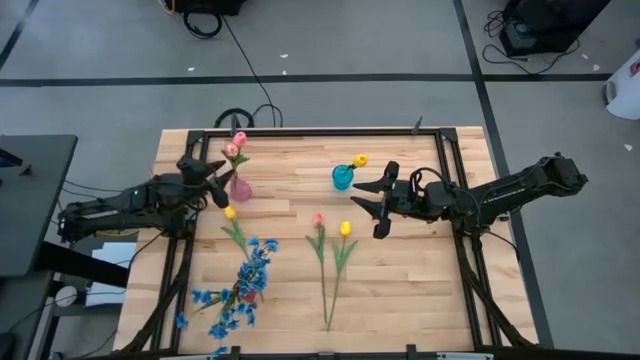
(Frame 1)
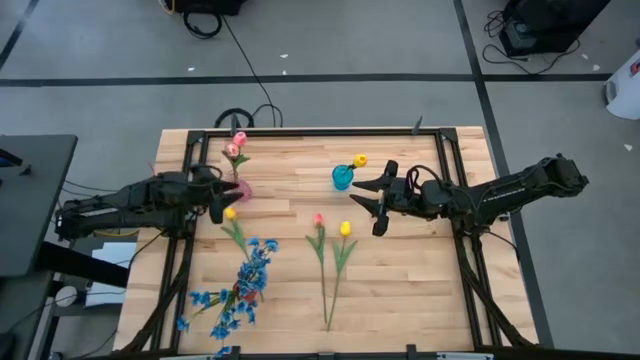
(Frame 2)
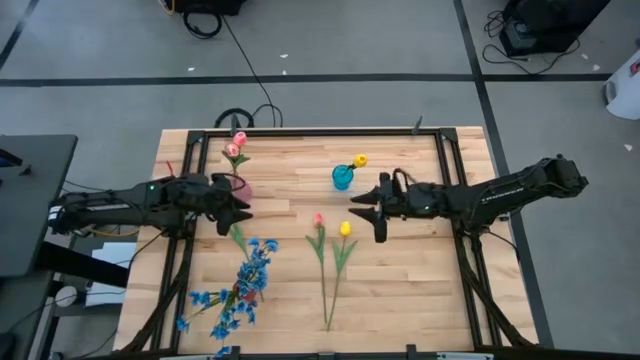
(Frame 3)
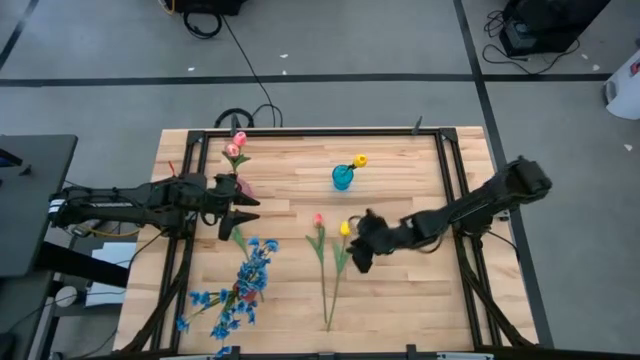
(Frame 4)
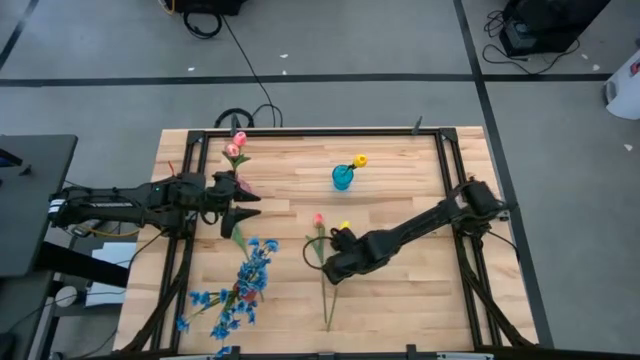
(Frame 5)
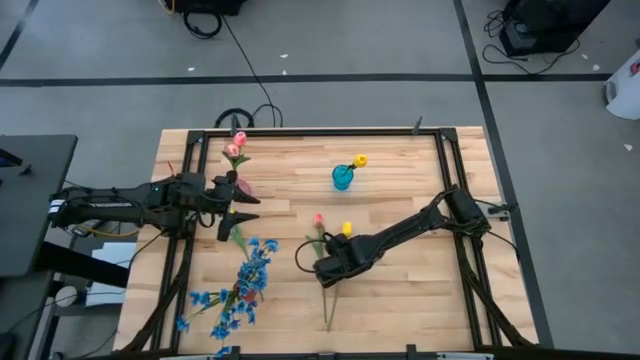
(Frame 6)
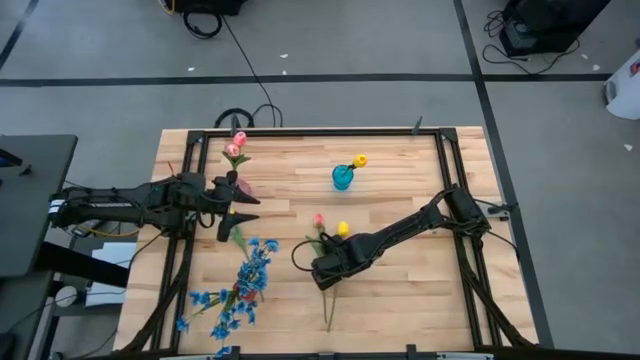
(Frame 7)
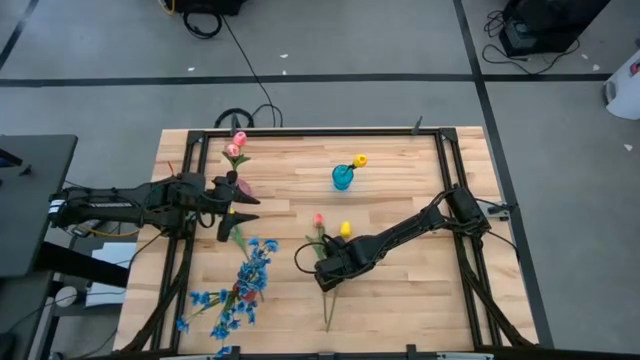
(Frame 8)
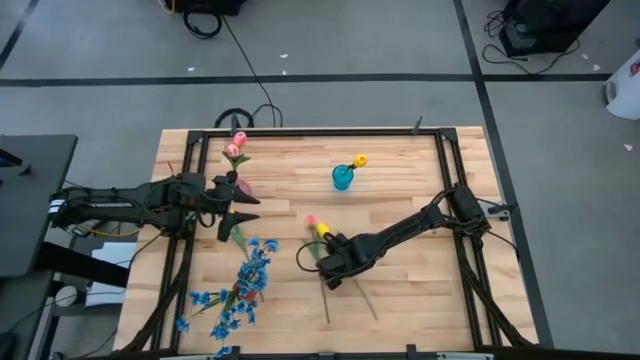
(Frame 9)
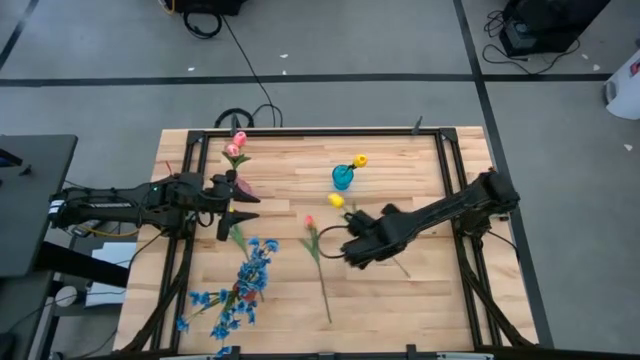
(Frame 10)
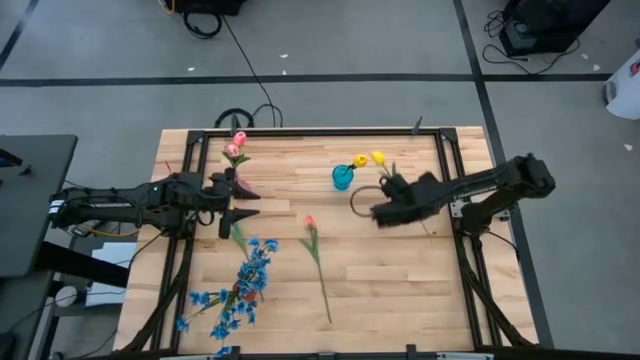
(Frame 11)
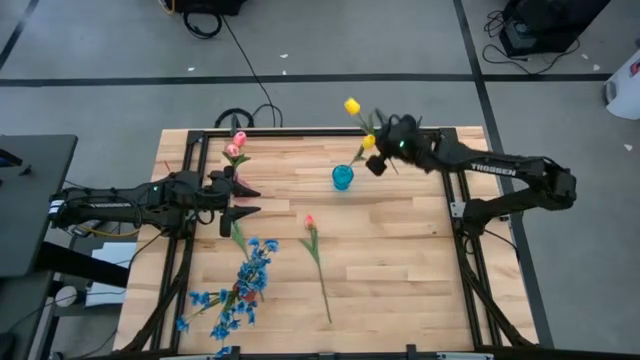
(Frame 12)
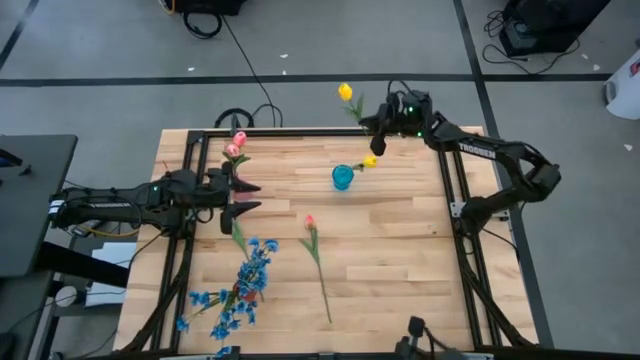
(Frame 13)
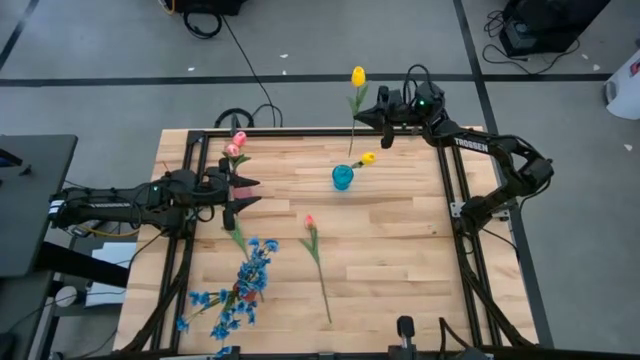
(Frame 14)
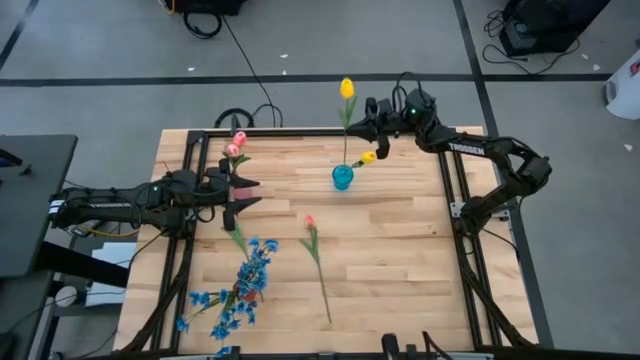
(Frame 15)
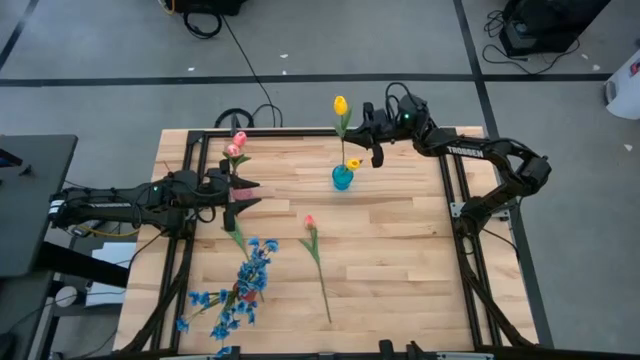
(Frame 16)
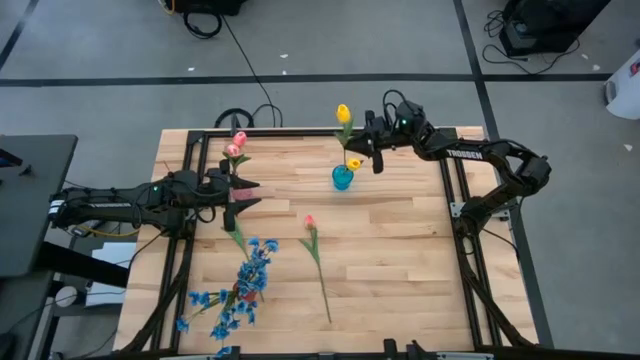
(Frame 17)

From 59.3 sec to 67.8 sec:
Task: Sort flowers into vase by color
Put the right yellow tulip into the blue vase

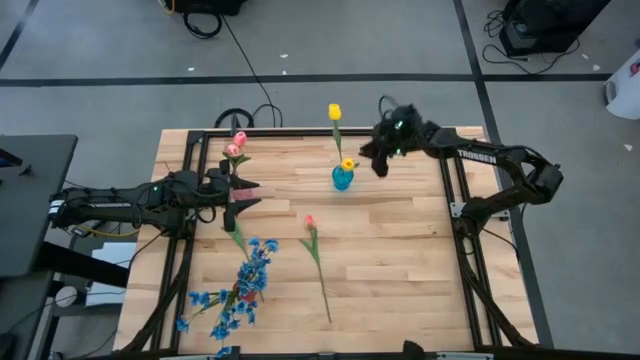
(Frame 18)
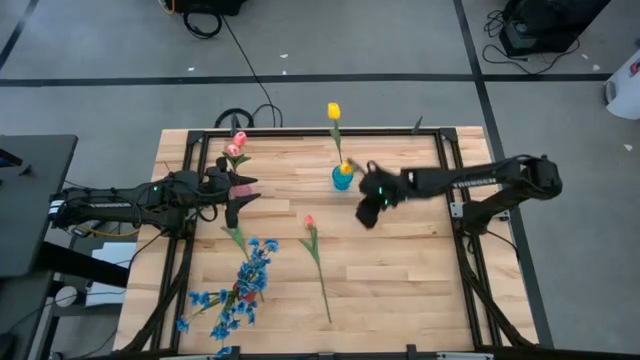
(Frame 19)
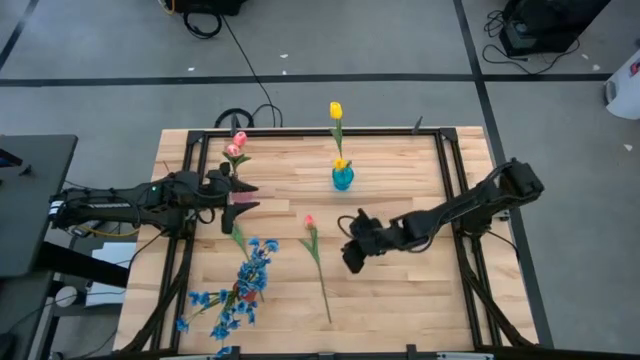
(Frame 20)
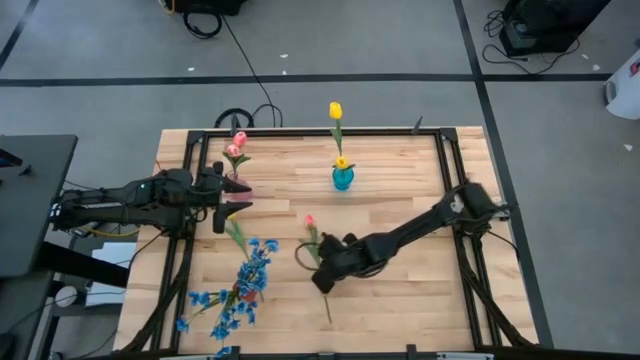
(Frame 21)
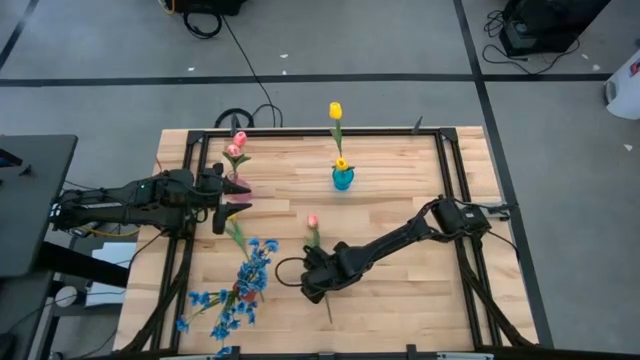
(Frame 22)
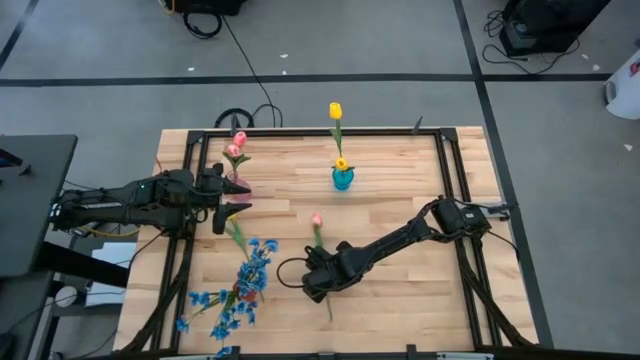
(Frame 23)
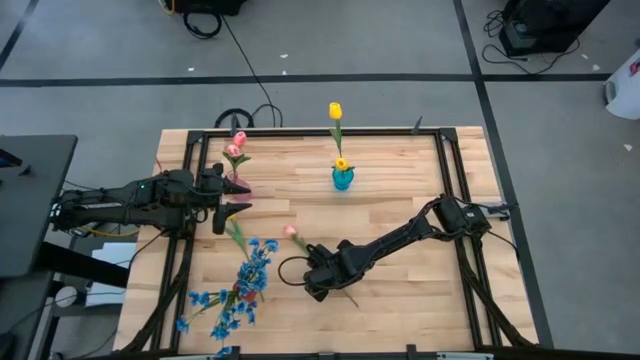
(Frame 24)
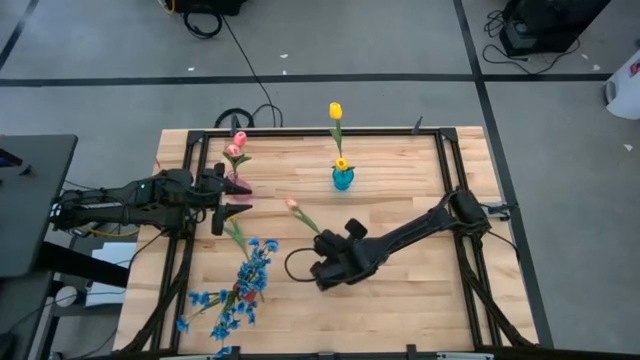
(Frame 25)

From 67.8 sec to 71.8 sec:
Put the pink tulip into the violet vase

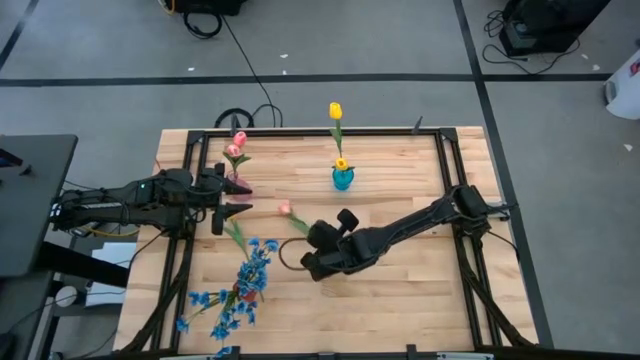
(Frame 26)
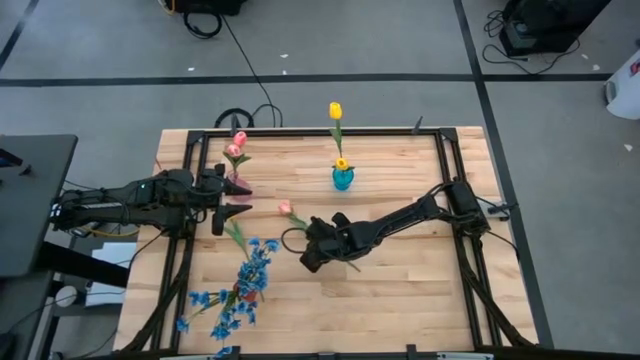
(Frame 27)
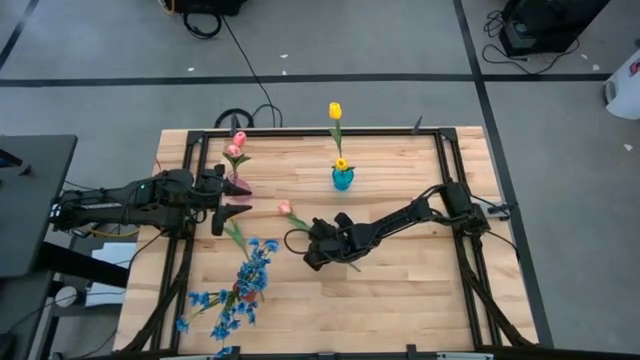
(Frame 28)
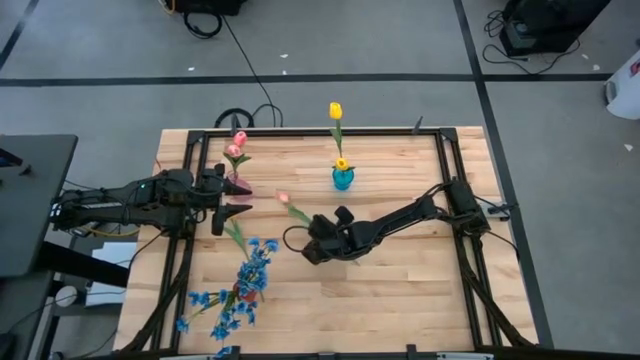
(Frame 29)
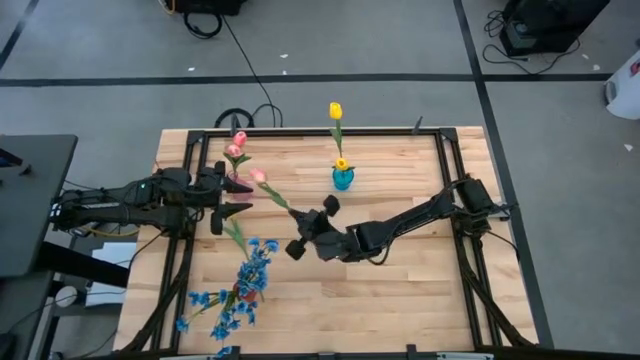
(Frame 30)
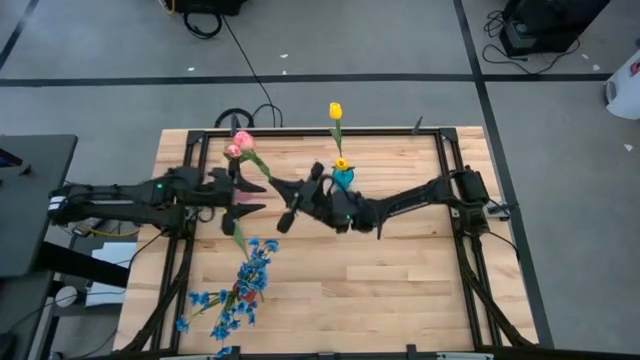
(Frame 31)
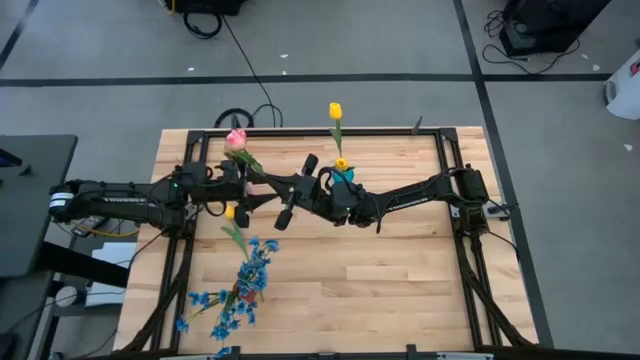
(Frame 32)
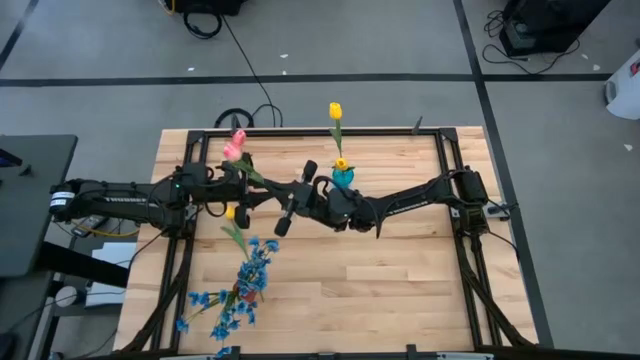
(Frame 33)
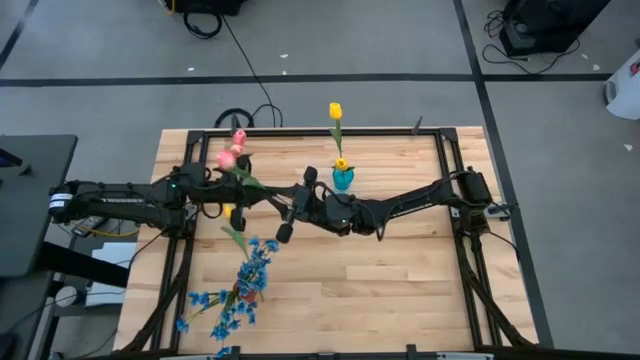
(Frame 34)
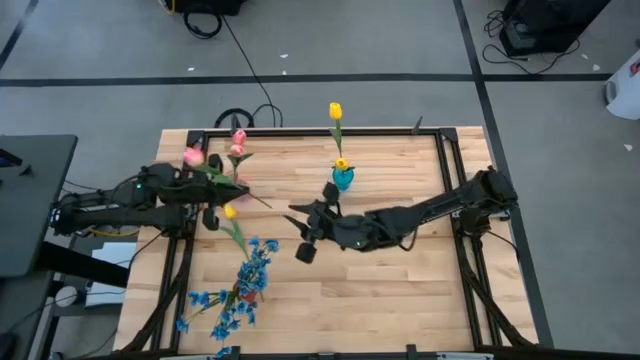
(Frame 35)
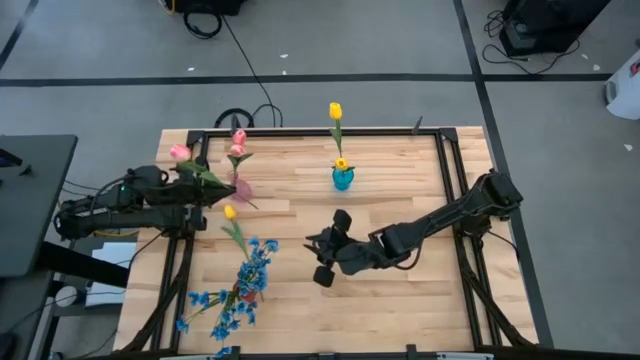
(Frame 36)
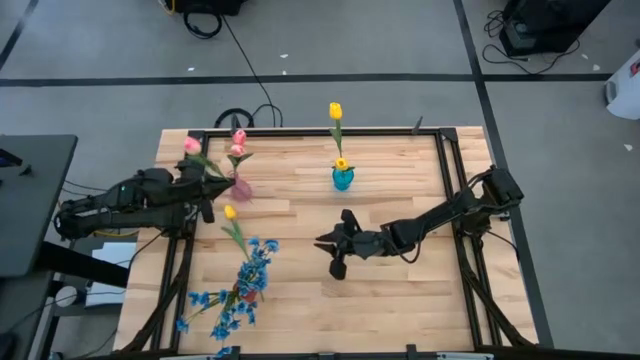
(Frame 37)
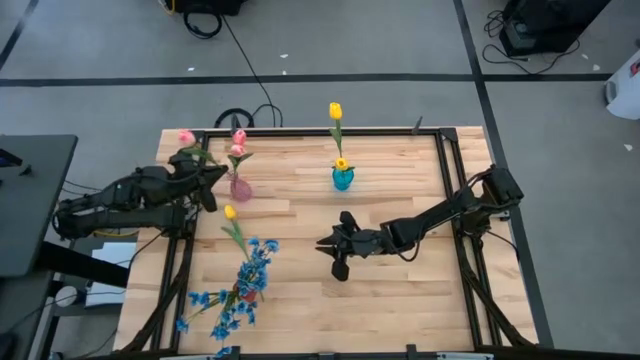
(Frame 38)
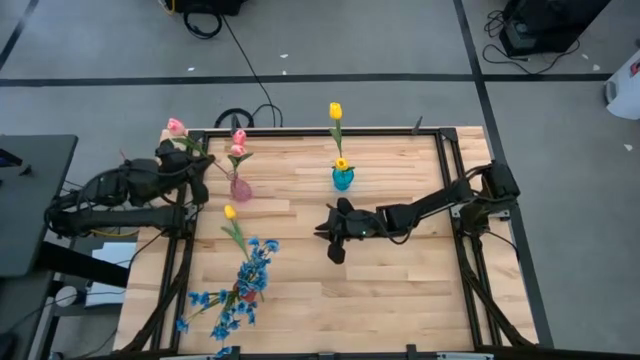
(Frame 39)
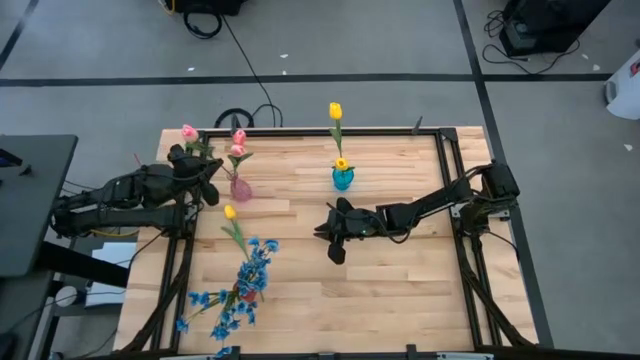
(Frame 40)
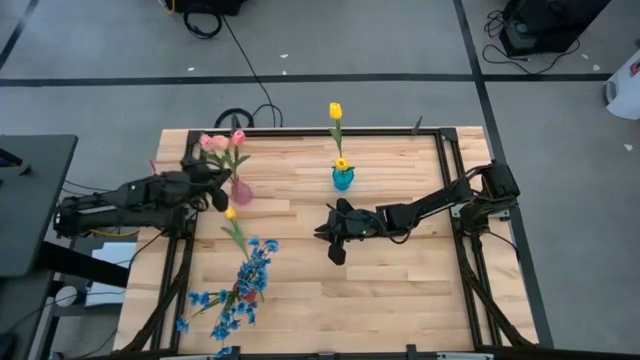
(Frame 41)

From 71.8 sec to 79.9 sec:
Put the pink tulip into the violet vase
